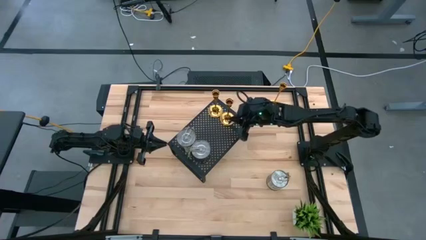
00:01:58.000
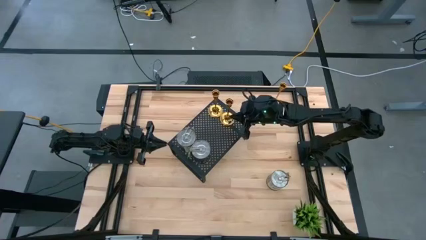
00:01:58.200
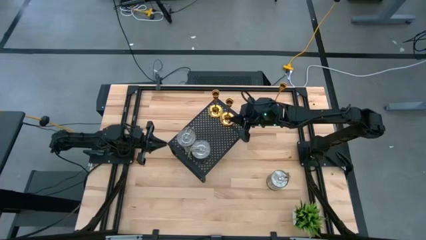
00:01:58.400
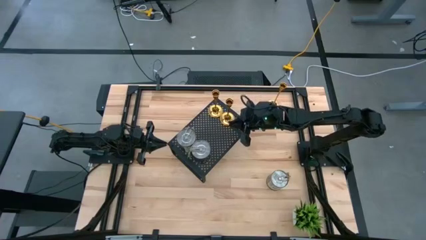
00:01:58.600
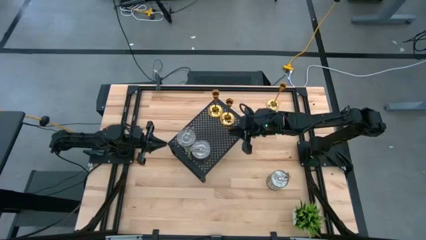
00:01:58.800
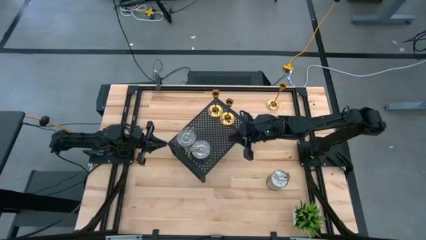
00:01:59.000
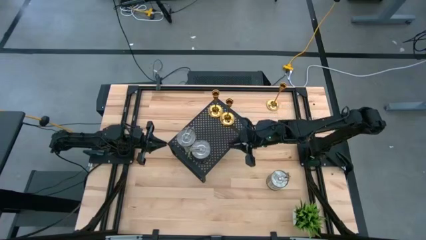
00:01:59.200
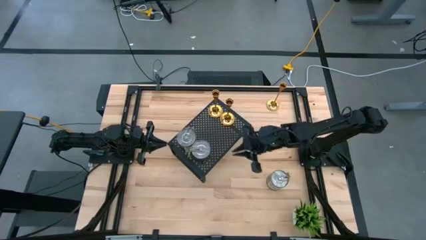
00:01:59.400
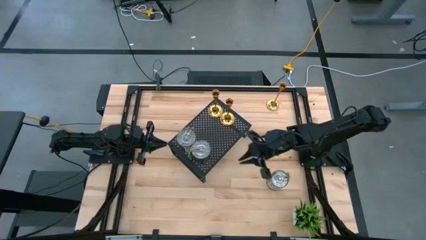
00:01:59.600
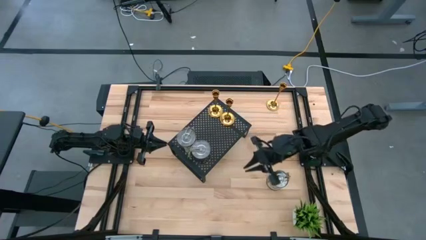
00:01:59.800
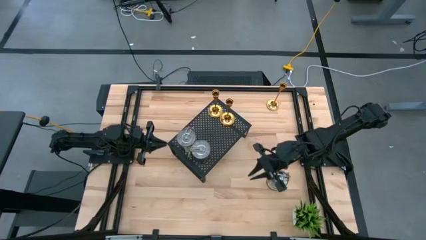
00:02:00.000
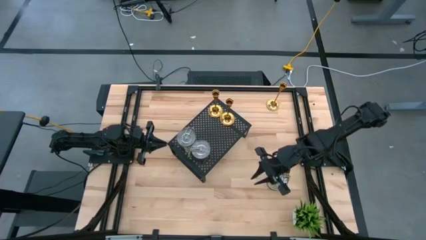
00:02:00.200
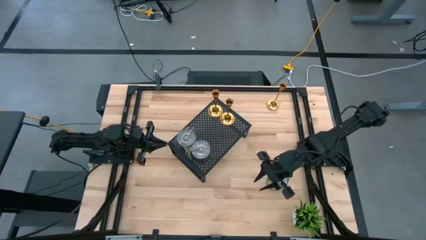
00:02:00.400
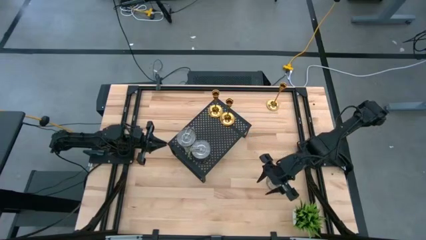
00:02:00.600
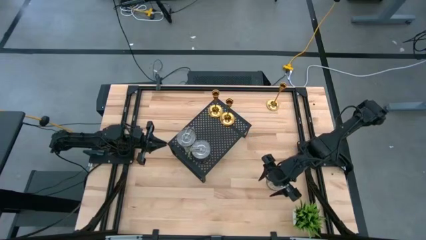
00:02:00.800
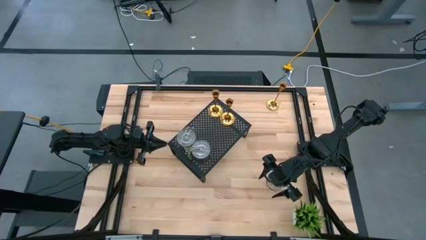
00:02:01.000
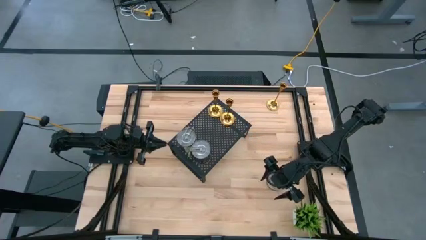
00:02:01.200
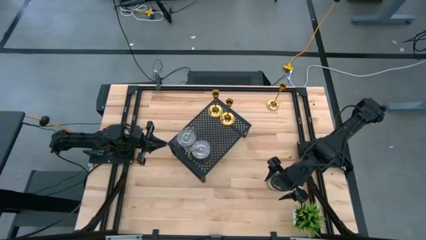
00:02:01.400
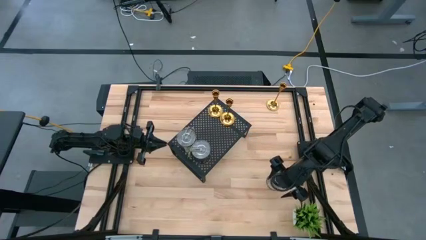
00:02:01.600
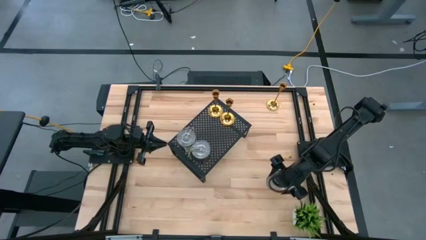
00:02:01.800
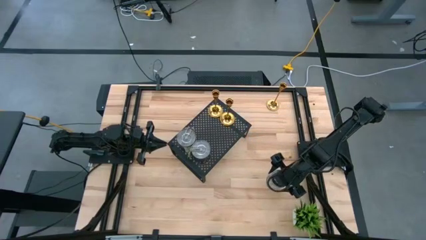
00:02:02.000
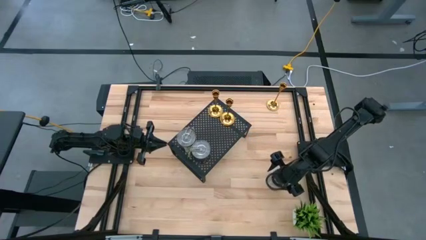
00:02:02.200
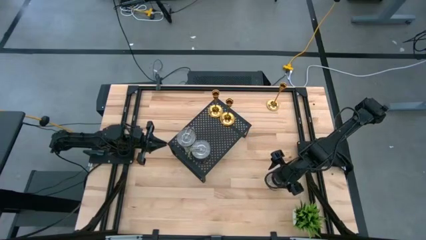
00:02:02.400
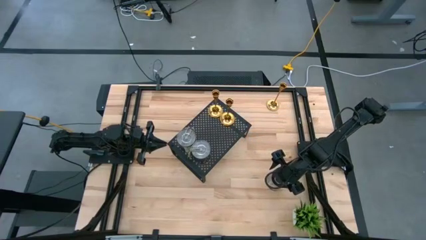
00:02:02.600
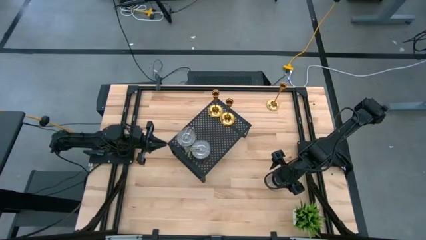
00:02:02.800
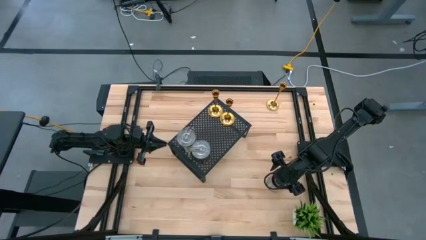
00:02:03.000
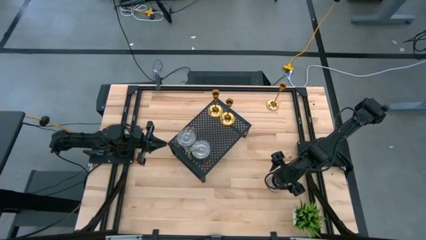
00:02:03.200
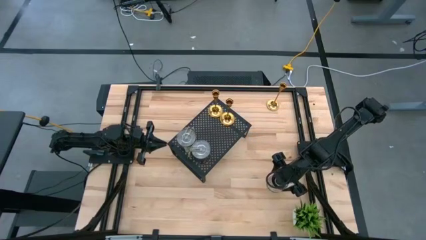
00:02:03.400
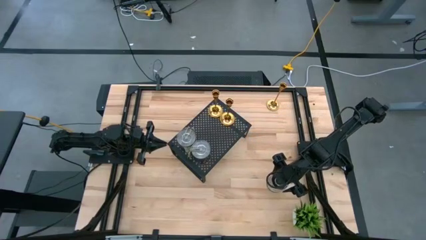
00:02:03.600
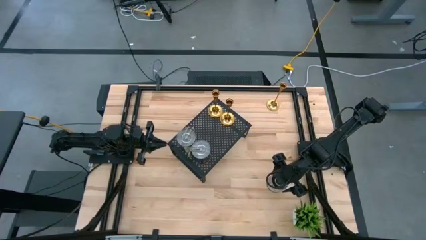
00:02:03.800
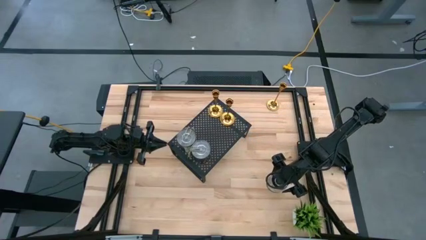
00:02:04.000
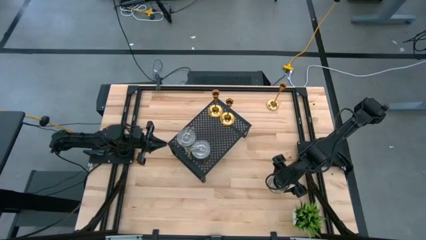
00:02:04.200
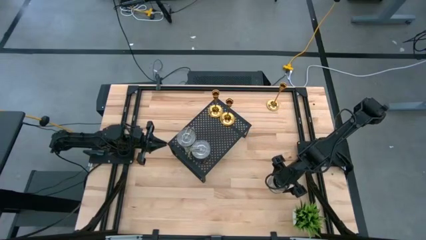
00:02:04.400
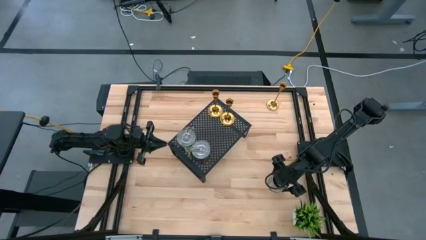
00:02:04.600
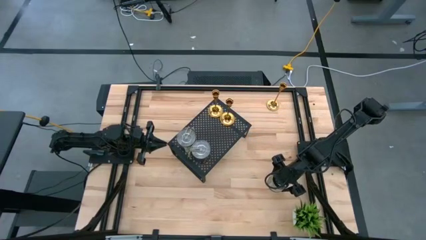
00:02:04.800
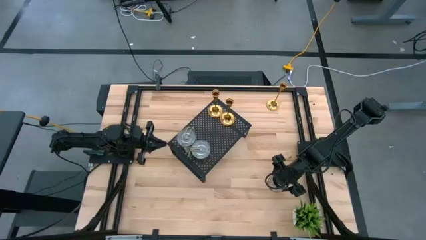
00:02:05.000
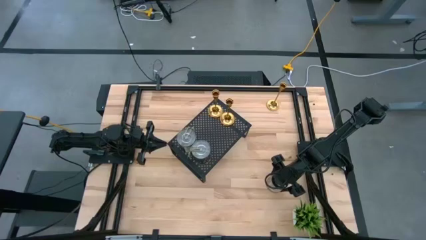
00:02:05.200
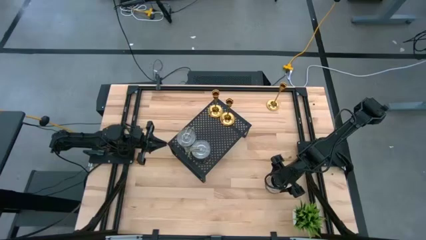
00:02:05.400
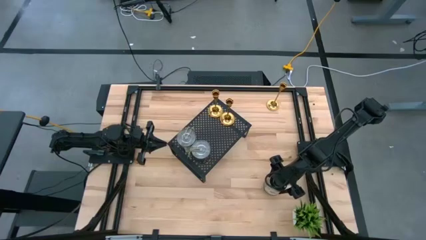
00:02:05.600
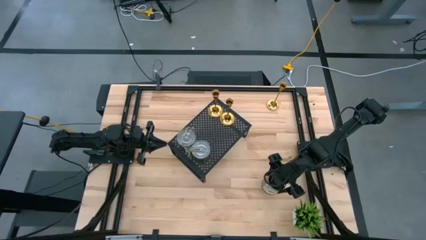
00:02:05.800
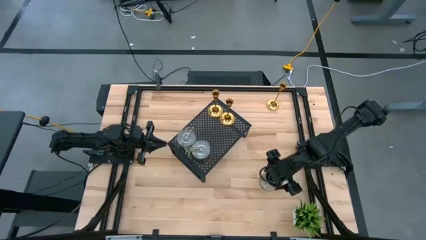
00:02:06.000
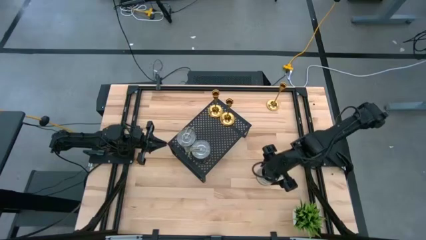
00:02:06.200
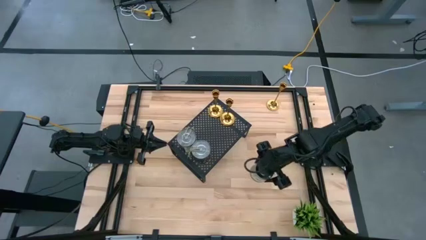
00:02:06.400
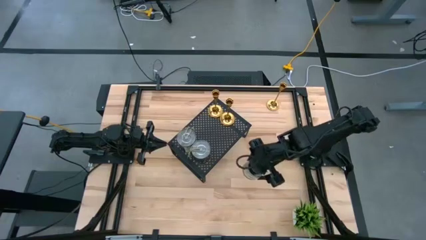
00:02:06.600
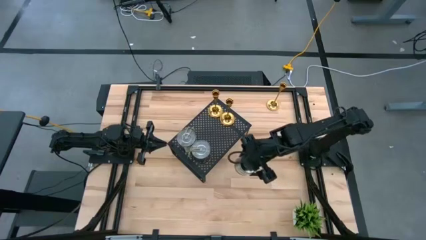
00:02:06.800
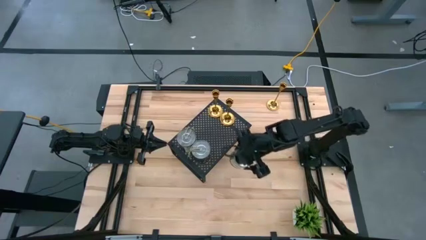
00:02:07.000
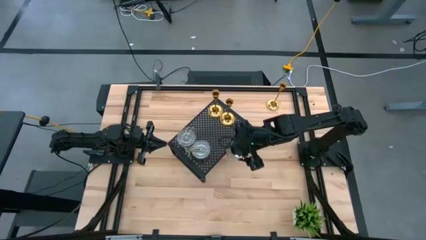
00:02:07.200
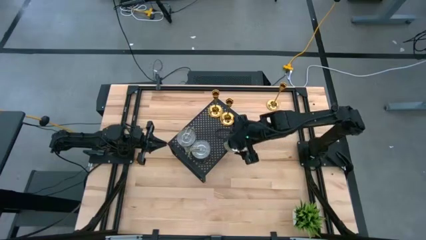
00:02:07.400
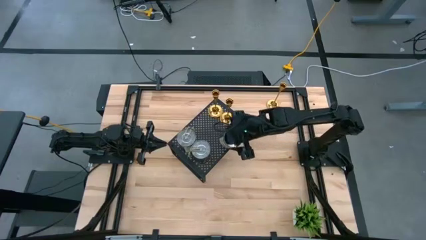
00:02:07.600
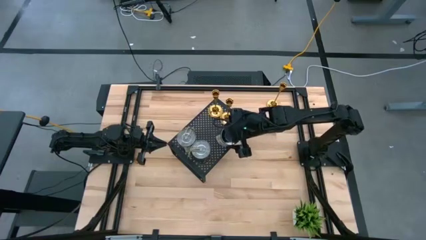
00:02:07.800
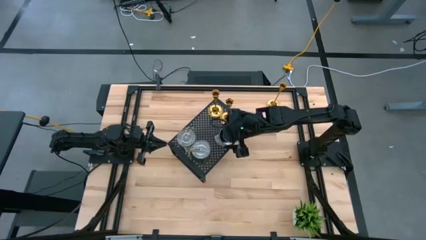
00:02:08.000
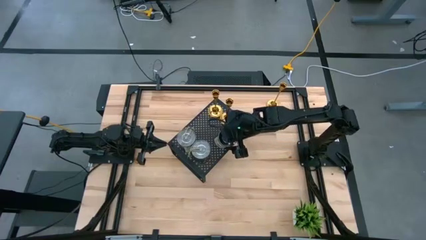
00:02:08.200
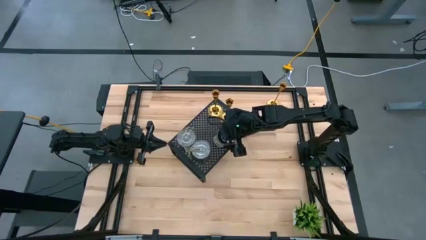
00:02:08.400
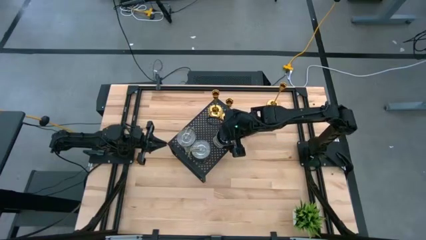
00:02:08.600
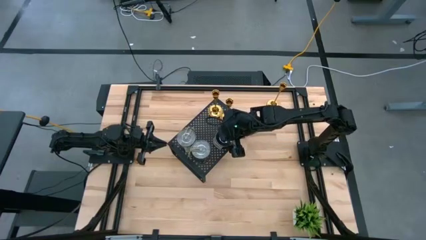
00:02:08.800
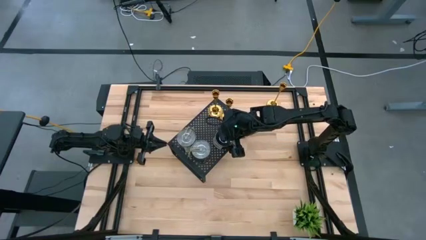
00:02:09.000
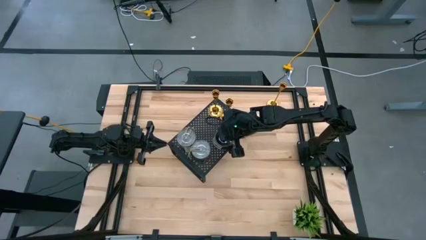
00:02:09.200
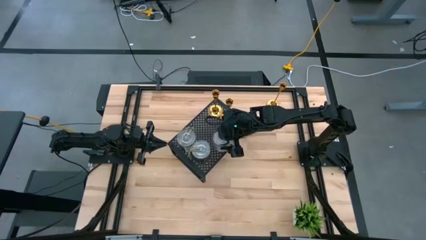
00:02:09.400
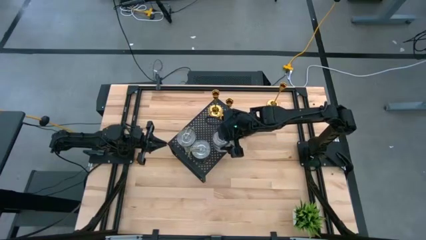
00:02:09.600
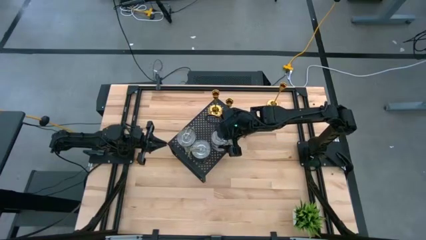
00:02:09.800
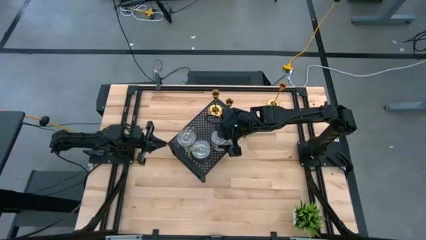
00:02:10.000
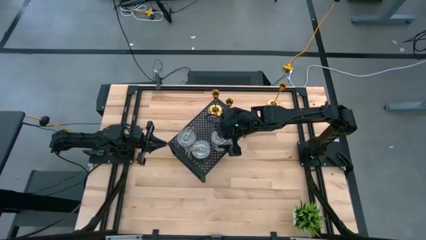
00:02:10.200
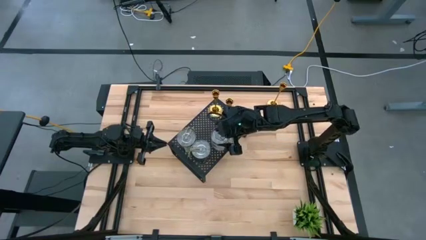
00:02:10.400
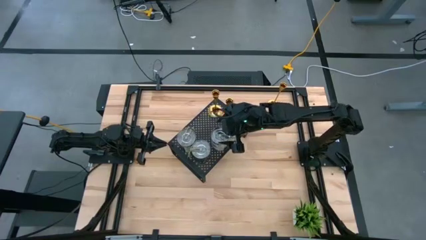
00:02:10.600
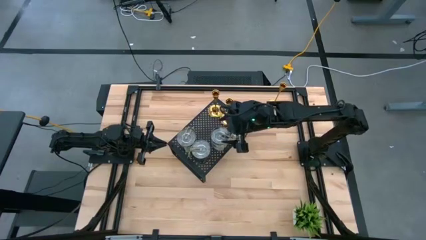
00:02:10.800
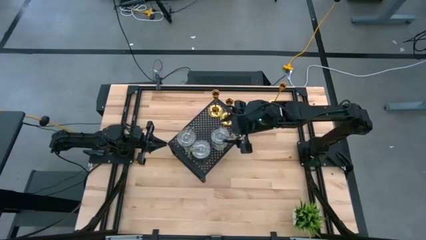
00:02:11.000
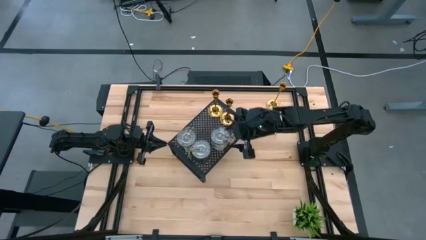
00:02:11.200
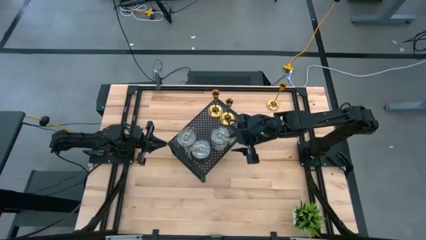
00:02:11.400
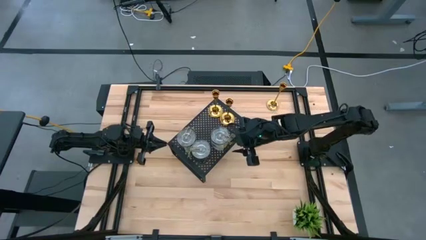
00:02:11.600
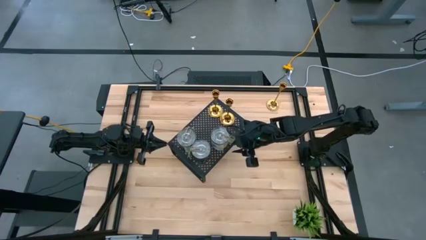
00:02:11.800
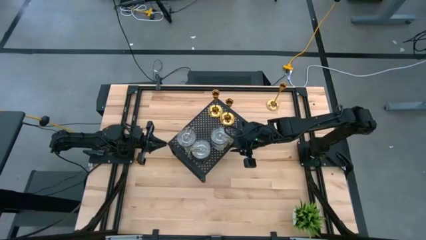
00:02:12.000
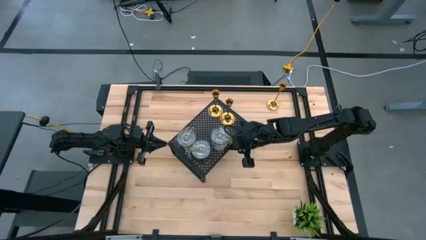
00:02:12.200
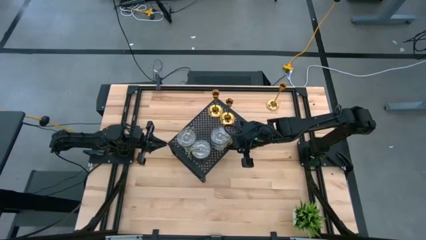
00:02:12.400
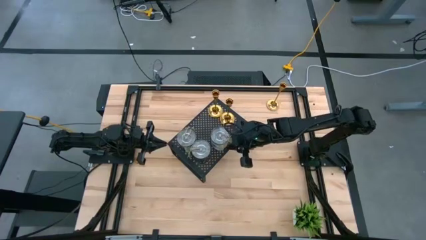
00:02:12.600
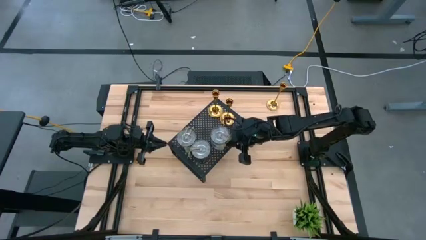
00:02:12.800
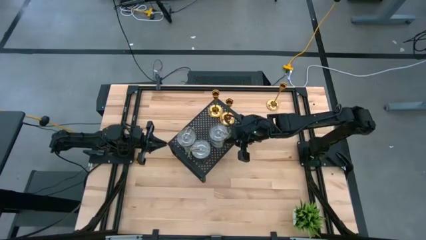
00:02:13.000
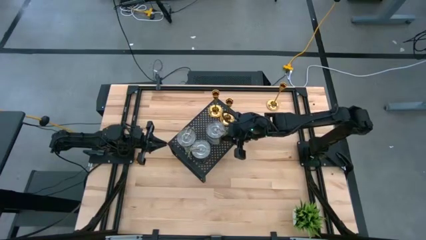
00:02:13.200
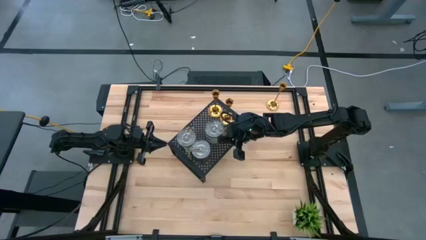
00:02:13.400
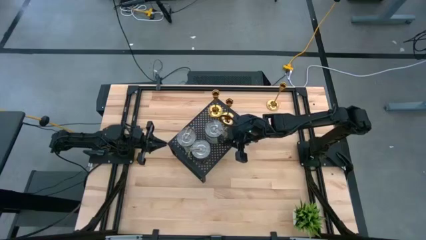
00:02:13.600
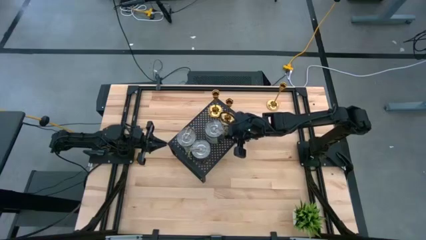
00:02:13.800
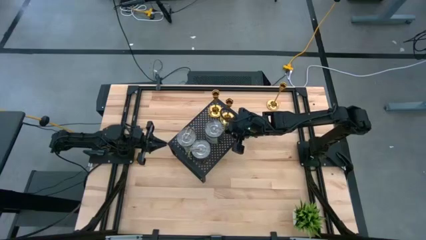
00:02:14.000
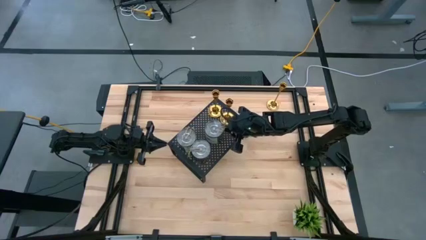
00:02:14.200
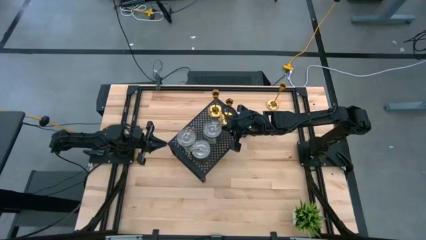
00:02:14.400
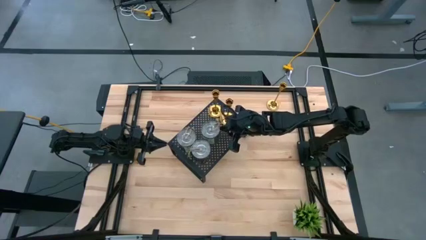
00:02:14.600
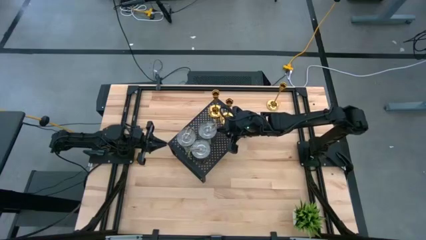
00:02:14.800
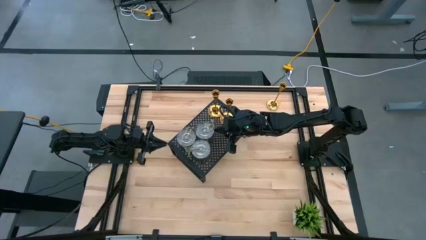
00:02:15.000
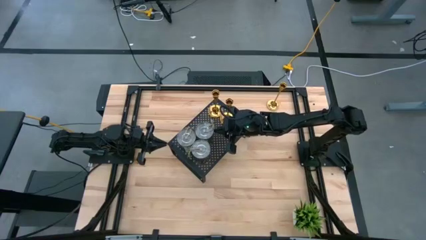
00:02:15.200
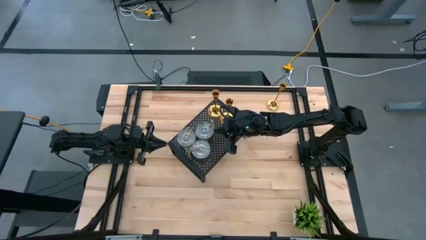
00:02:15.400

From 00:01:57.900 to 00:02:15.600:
Task: Pick & Place candle stick holders
Put the scented candle on the shelf aligned with the other silver scented candle
